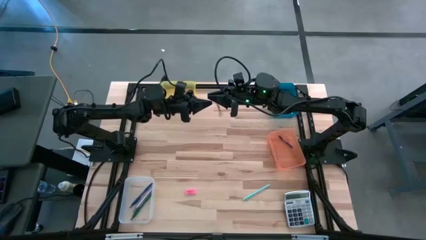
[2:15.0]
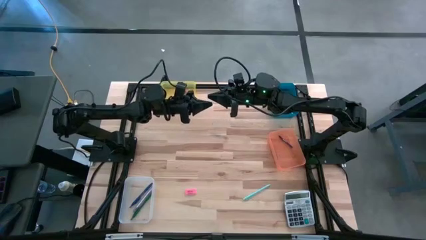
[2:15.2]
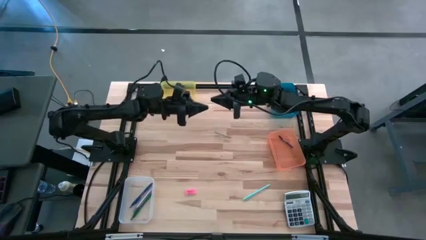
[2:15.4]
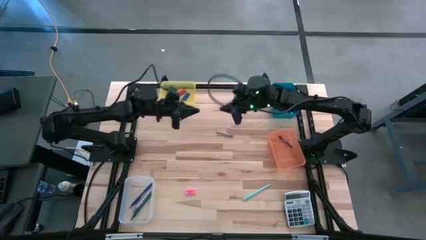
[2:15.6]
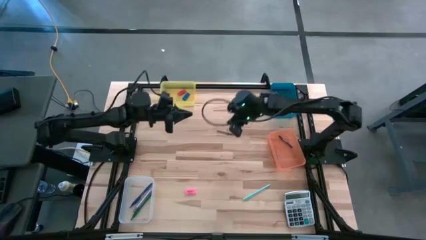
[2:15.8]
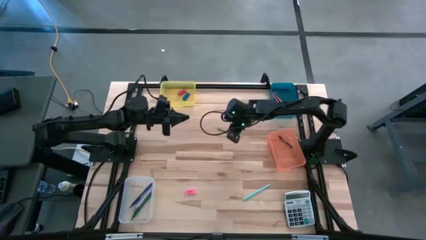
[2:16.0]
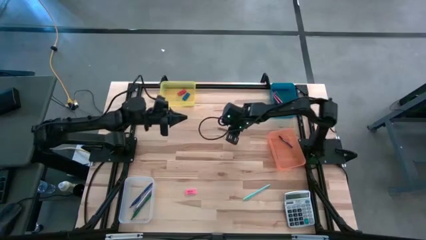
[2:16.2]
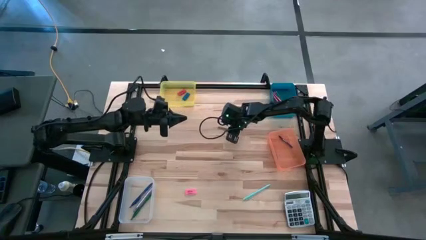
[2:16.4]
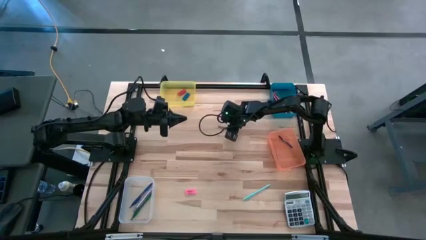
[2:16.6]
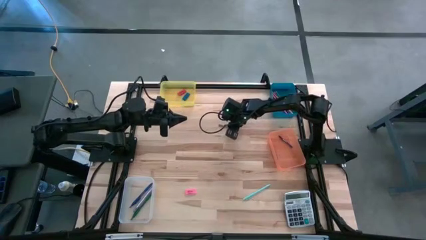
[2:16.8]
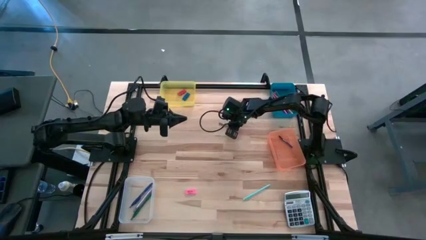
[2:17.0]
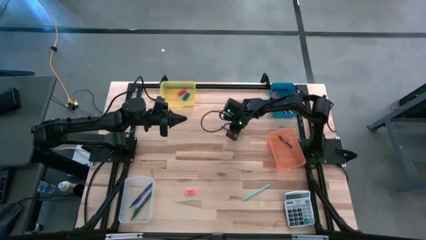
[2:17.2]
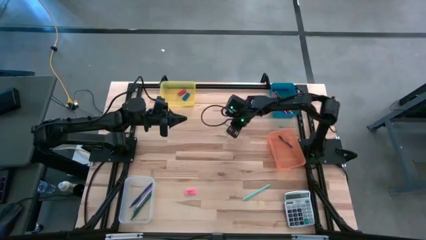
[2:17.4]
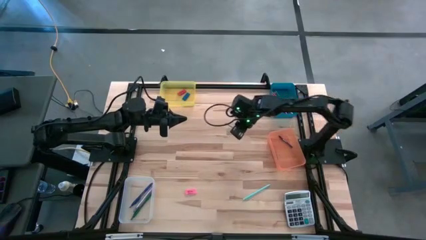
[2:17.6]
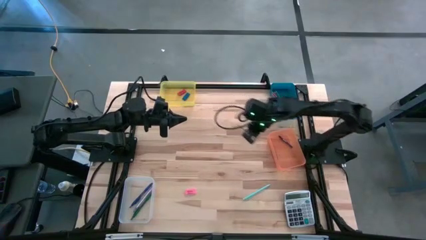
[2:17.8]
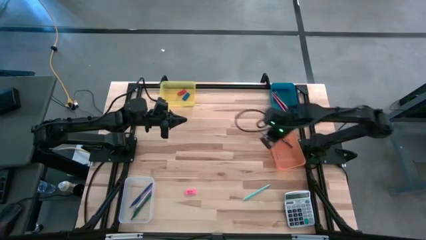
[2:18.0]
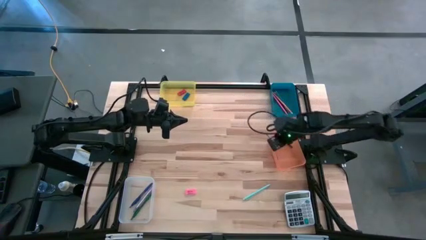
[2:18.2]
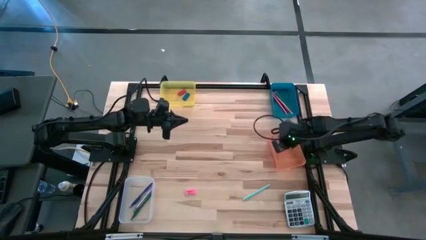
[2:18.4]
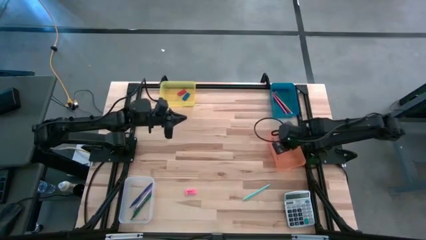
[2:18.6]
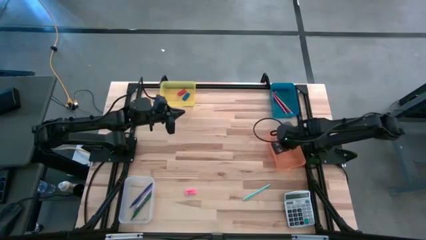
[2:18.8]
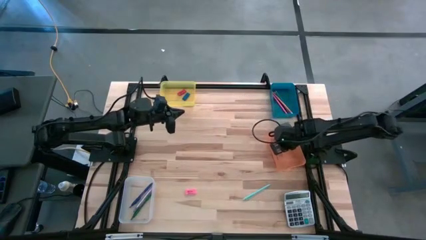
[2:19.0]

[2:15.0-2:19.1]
Task: Sort crayons/erasers/pens/pencils in bins
Put the gray crayon into the orange bin

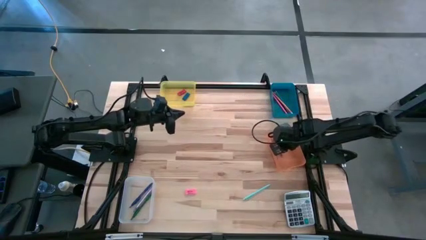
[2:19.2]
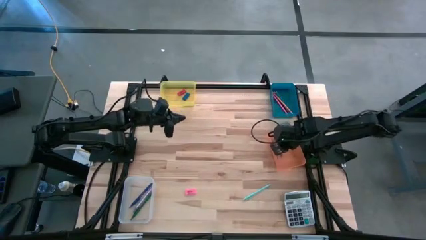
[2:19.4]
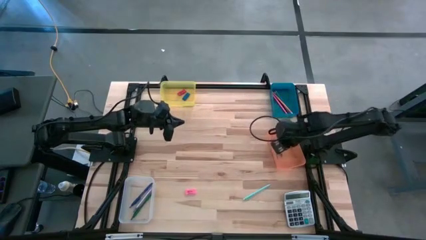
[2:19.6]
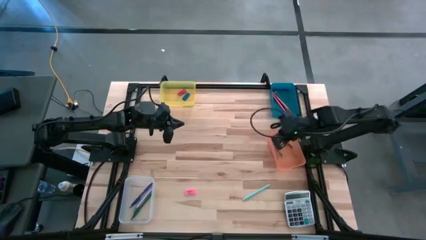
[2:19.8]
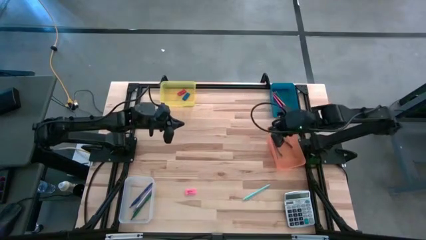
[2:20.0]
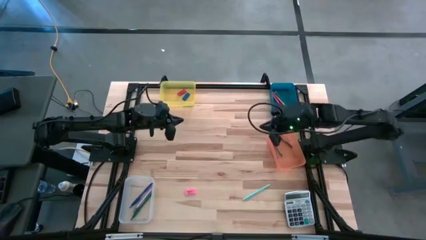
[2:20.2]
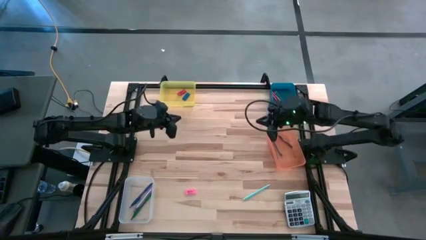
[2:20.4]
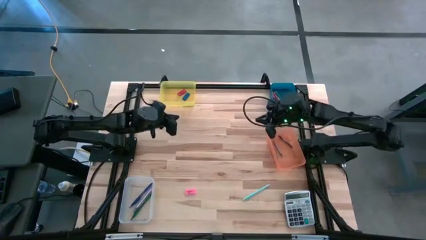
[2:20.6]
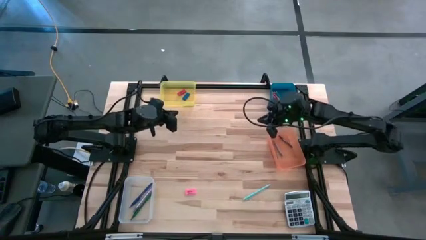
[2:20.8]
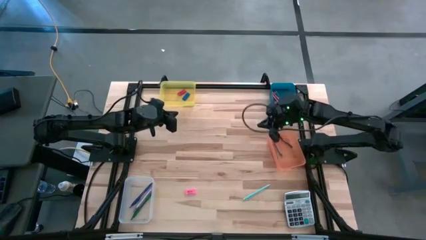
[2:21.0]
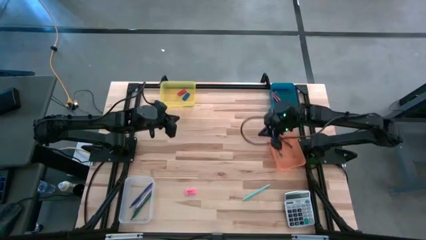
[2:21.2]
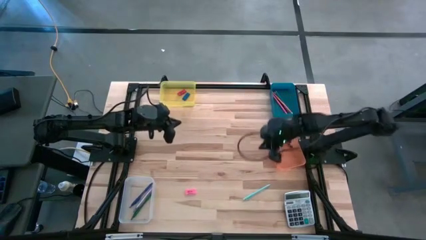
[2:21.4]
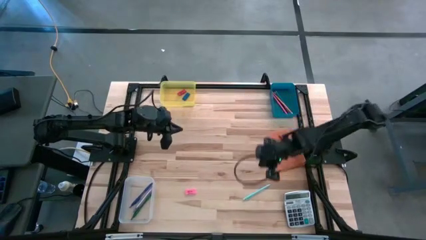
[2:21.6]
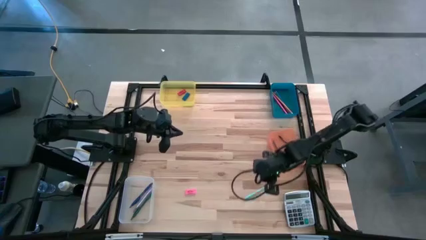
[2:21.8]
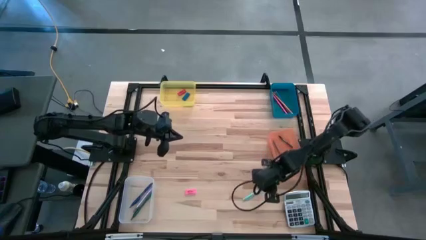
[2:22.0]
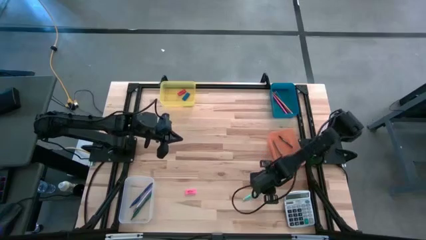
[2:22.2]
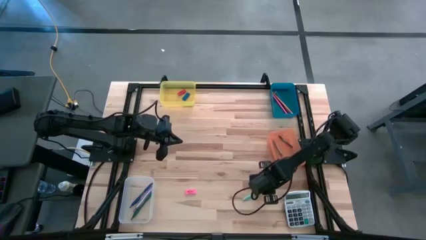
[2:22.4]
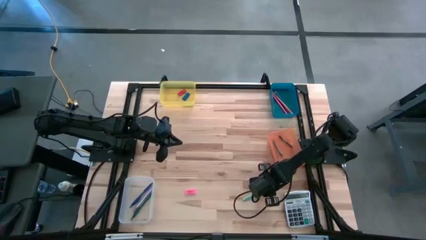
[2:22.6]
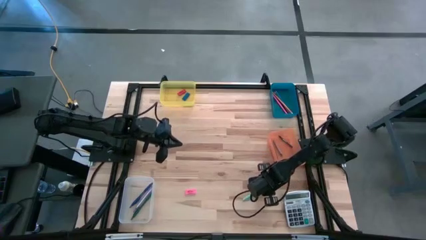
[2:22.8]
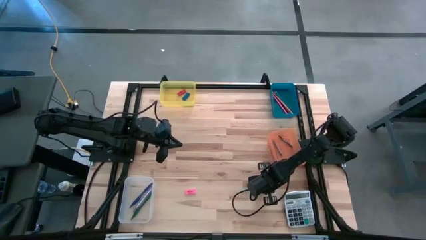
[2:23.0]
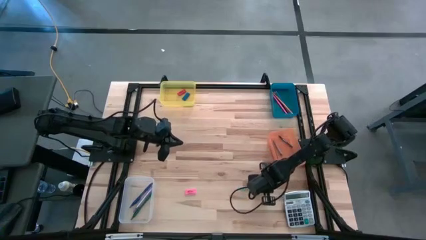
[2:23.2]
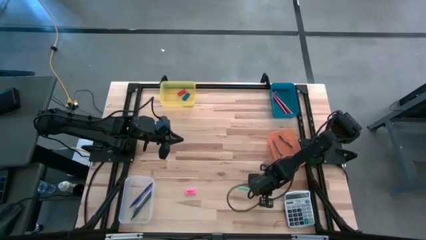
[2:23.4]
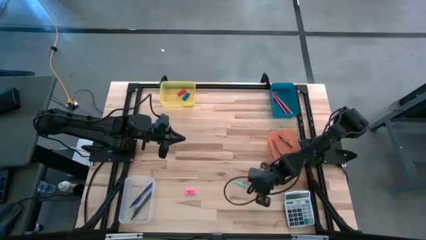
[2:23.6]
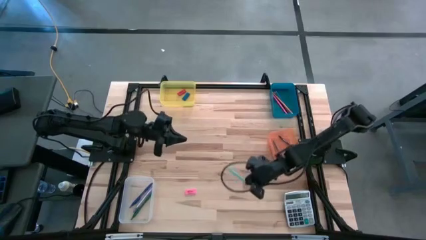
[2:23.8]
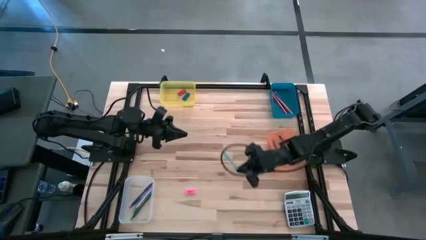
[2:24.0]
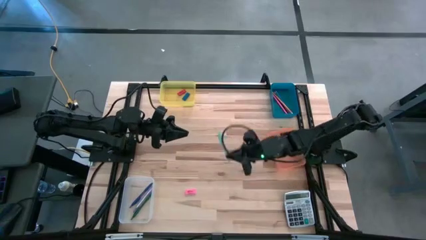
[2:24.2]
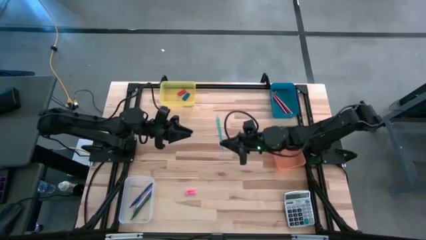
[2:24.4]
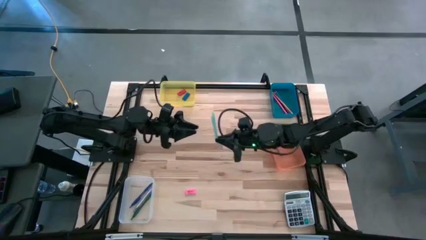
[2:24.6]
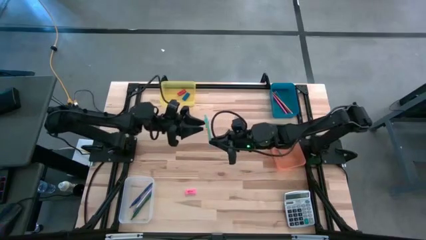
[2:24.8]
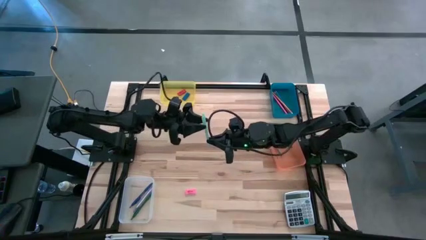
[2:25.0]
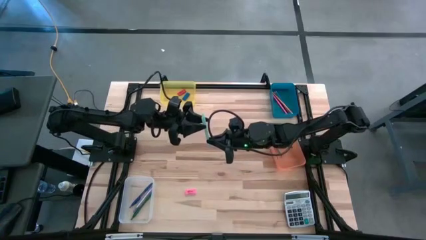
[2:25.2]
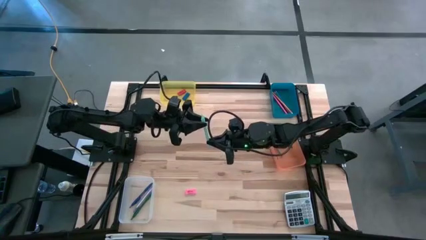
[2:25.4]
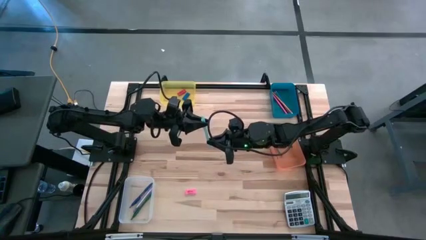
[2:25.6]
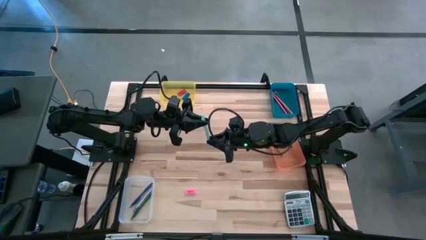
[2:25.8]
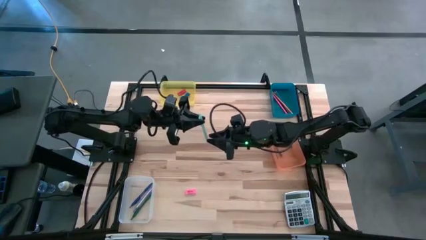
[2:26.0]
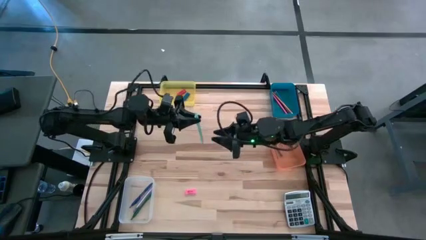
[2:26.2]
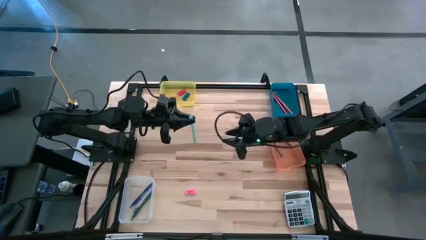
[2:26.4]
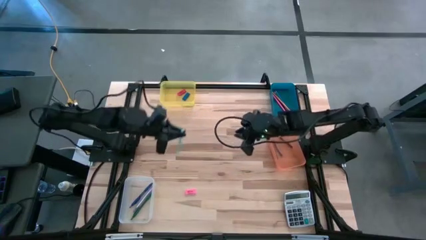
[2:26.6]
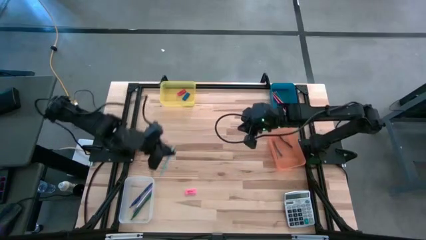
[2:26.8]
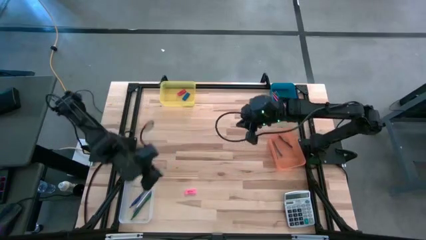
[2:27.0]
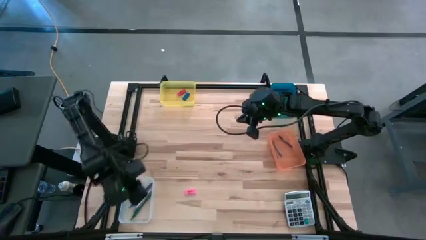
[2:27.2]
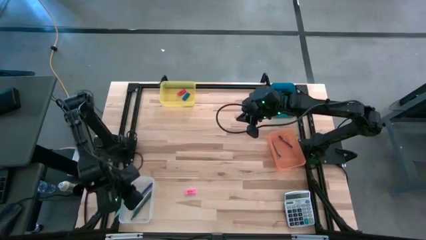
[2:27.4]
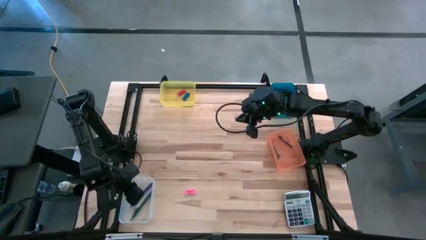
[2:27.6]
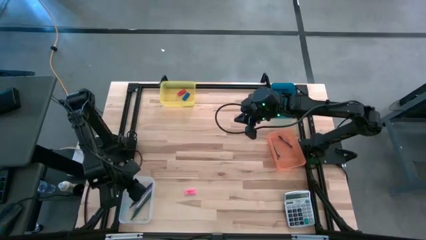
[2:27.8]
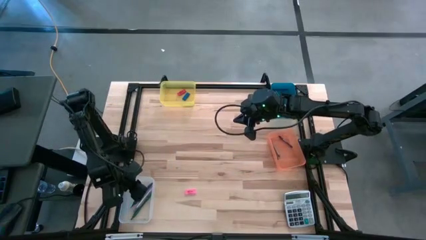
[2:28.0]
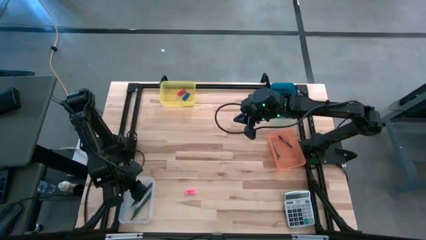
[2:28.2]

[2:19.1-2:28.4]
Put the light blue pen into the white bin

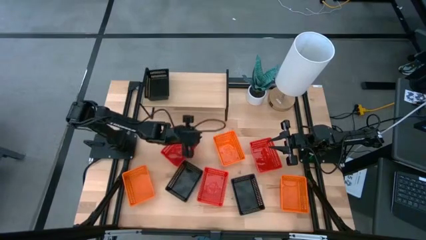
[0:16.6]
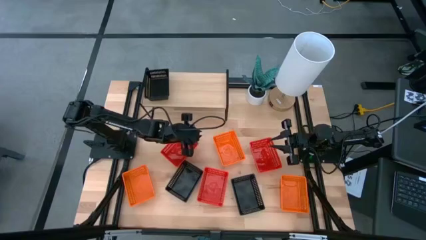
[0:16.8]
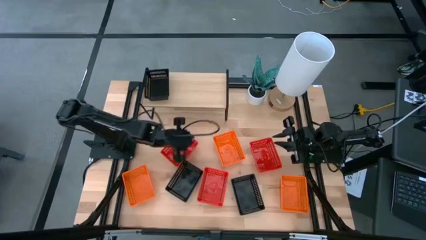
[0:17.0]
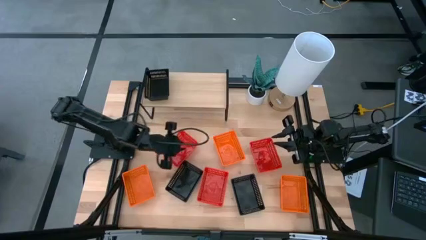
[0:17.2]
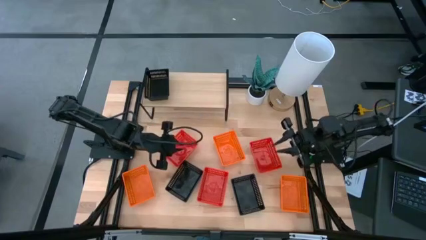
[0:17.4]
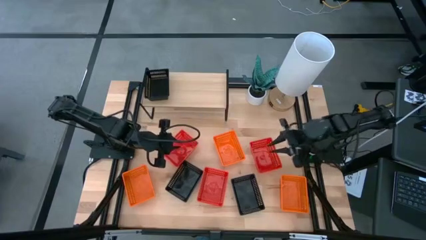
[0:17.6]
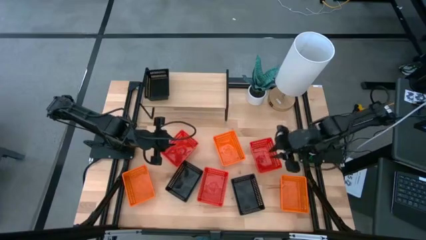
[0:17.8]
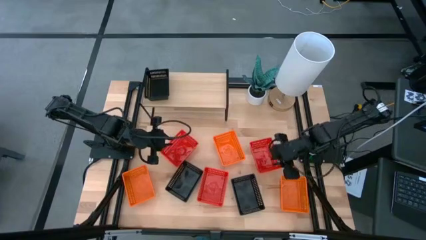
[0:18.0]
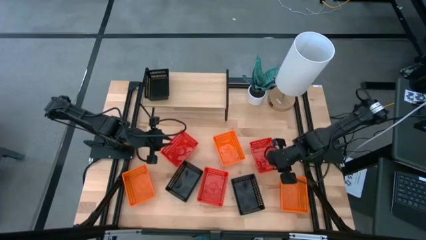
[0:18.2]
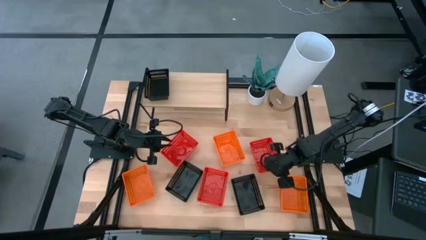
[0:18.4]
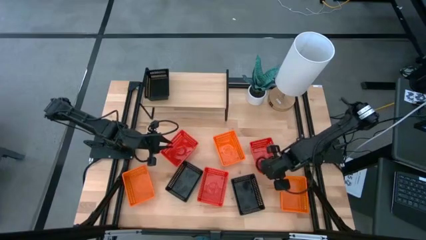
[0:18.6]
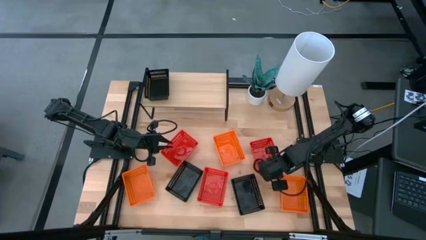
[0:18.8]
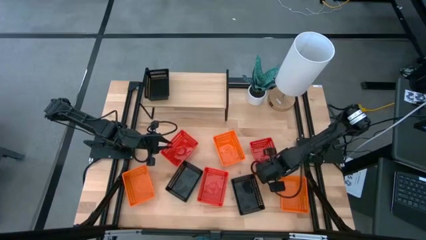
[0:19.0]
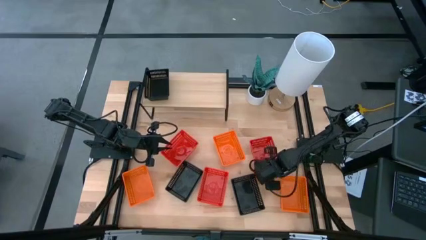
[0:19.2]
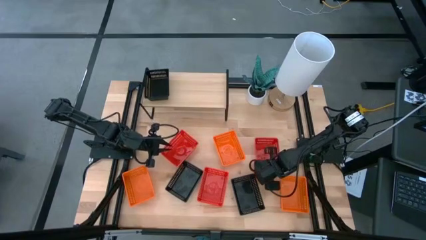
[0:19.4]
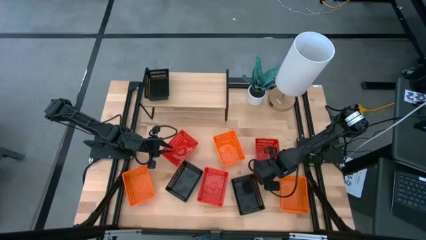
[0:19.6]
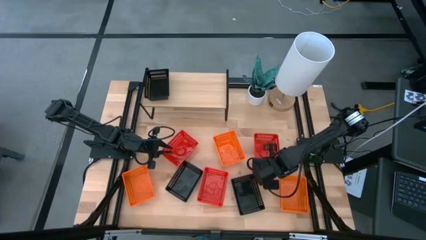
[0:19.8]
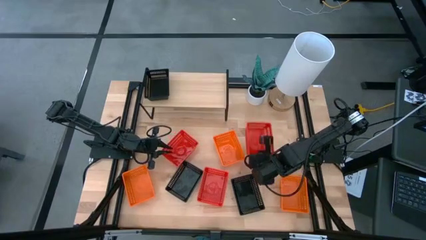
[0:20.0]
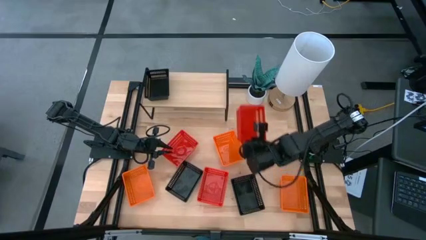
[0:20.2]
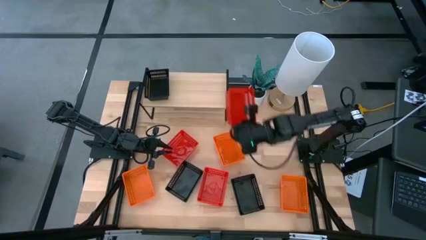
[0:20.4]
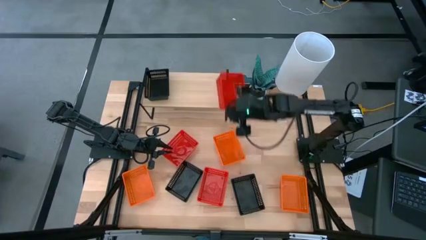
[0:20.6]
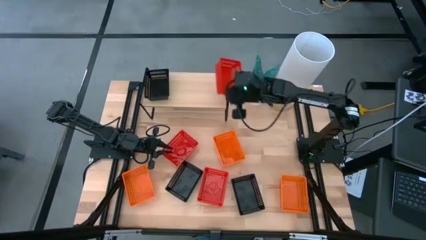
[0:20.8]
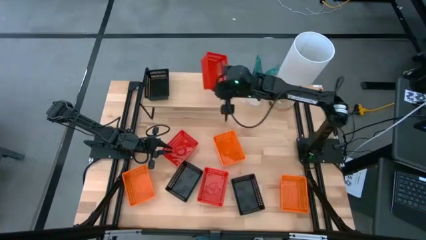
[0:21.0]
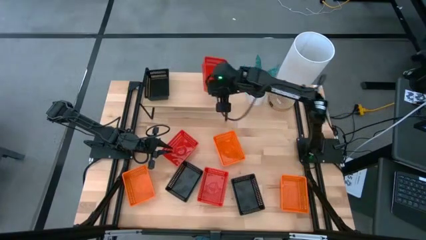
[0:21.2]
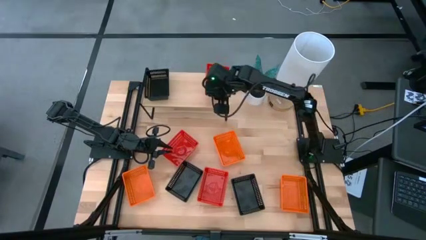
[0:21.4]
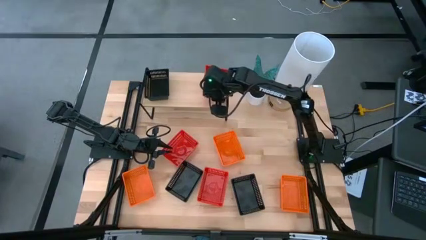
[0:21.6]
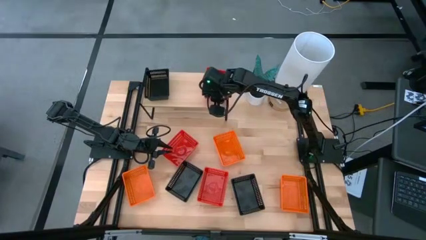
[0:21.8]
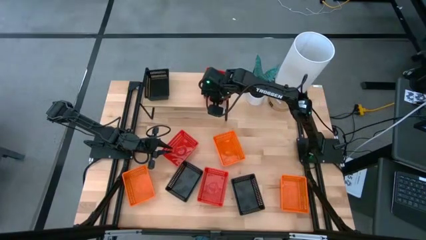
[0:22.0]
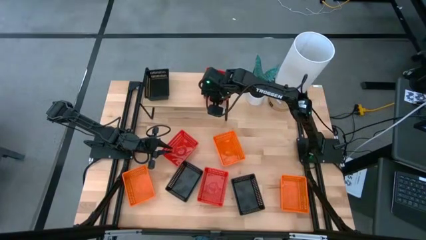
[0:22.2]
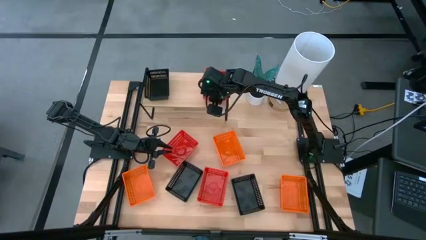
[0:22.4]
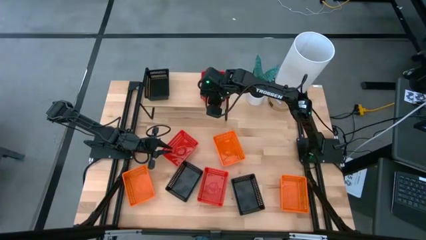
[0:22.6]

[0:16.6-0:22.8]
Task: Stack baskets on shelf by color
Put the top right red bin on the shelf
